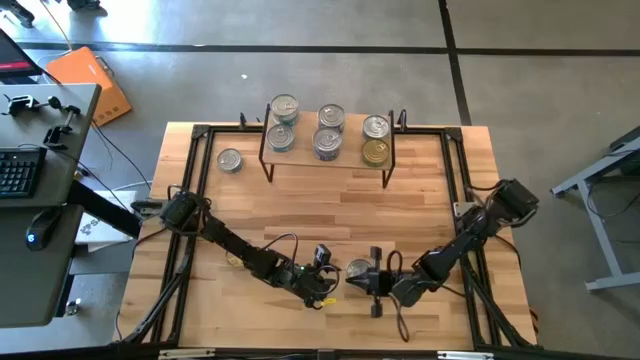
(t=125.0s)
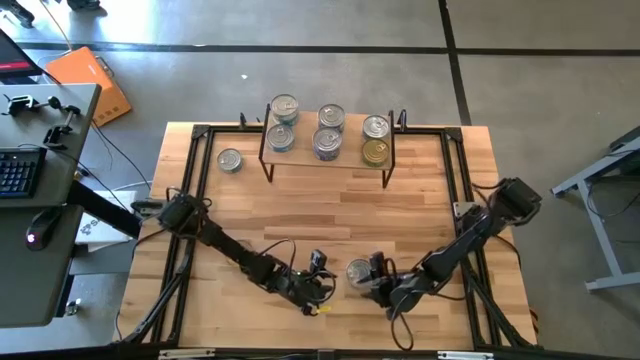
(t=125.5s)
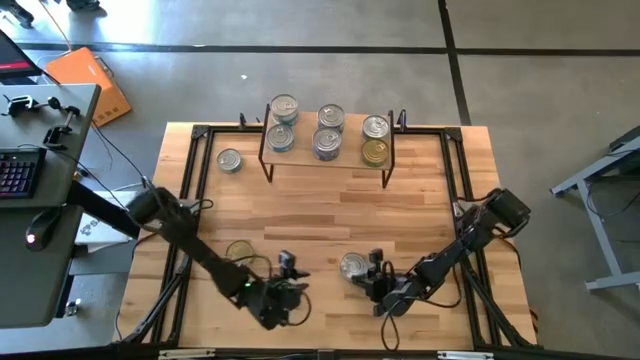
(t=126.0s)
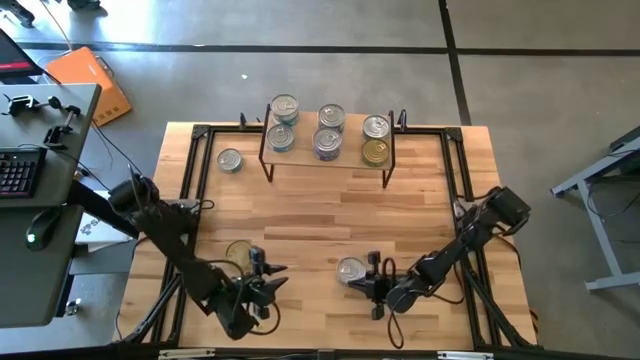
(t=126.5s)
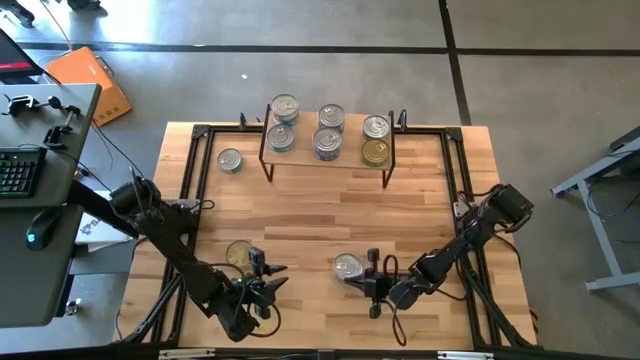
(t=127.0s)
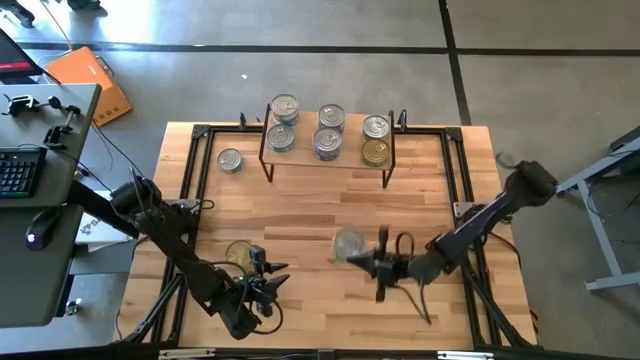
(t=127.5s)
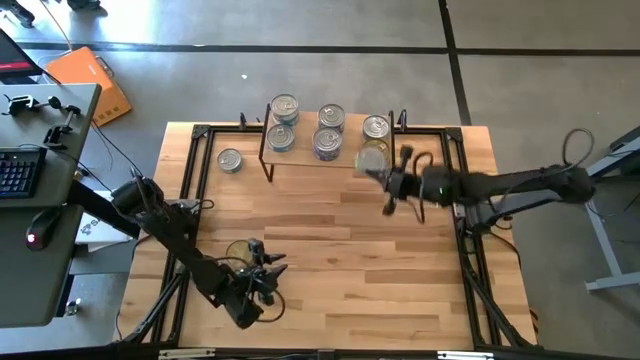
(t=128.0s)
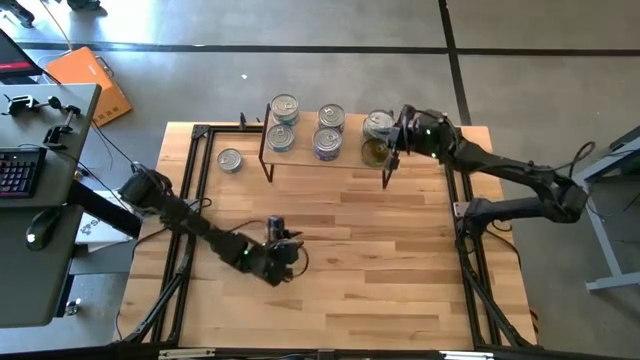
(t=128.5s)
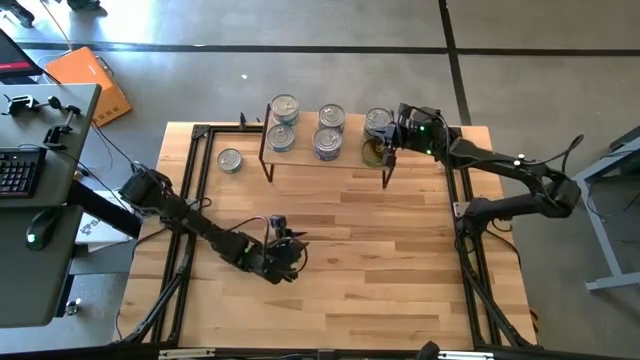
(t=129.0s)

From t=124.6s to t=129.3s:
Task: Stack canned seafood by type on shelf
Stack the green tuna can on top of the green tuna can on the shelf

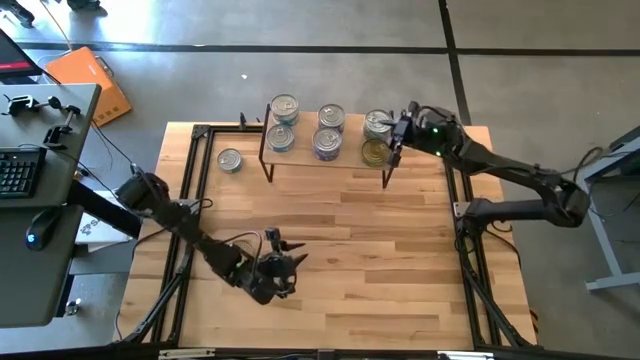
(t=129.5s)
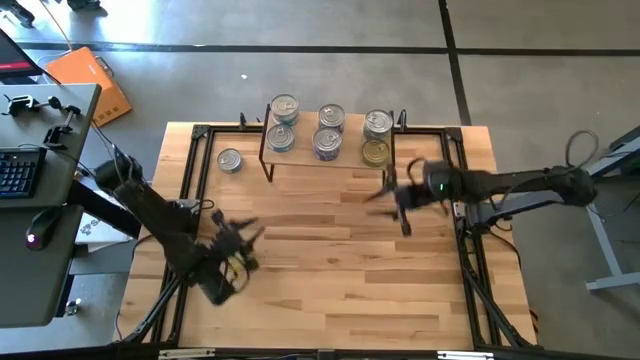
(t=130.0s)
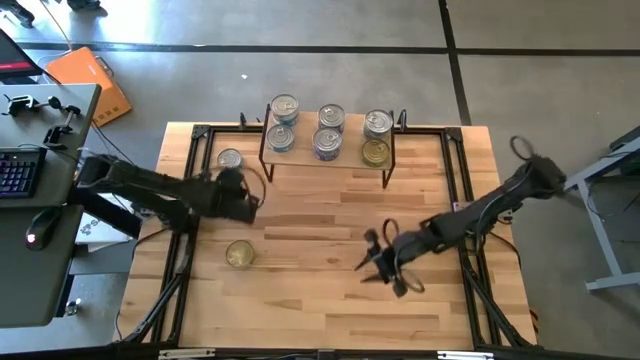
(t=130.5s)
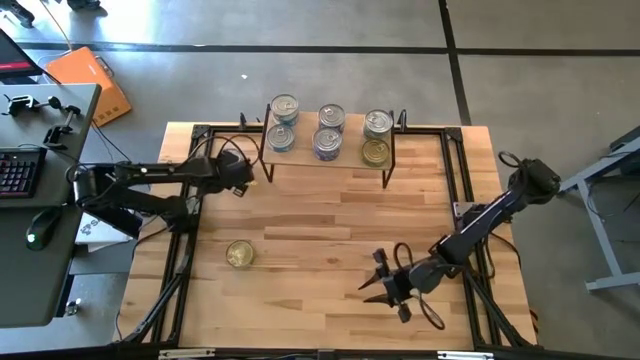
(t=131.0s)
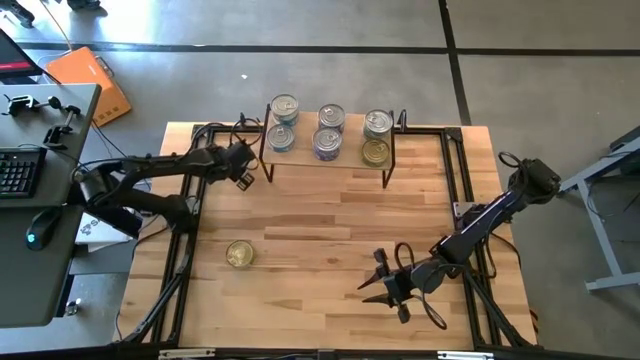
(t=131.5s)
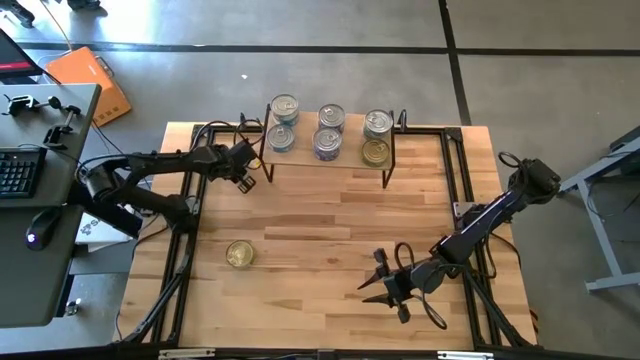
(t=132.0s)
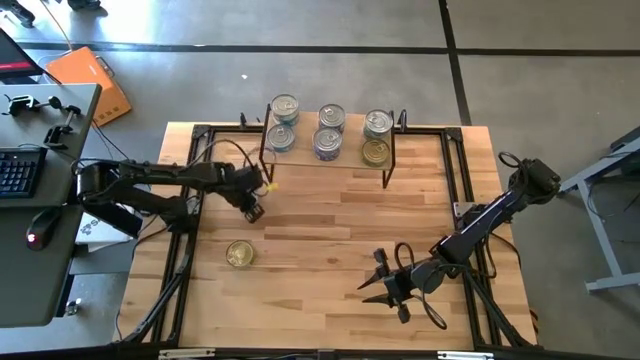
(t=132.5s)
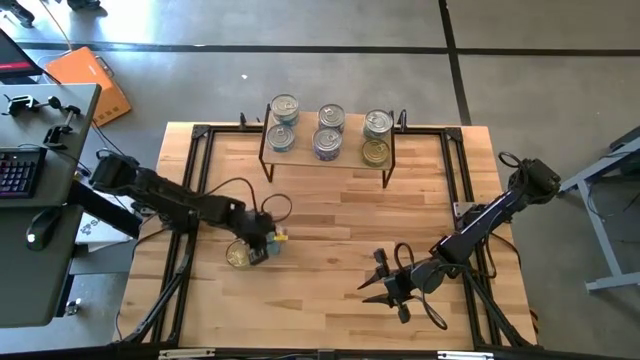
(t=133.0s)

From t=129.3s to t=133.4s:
Stack the yellow blue tuna can on top of the yellow blue tuna can on the shelf

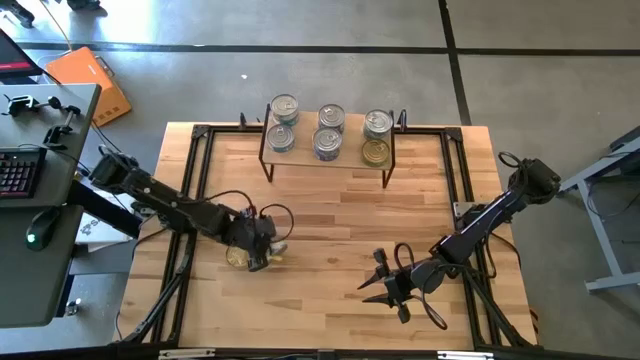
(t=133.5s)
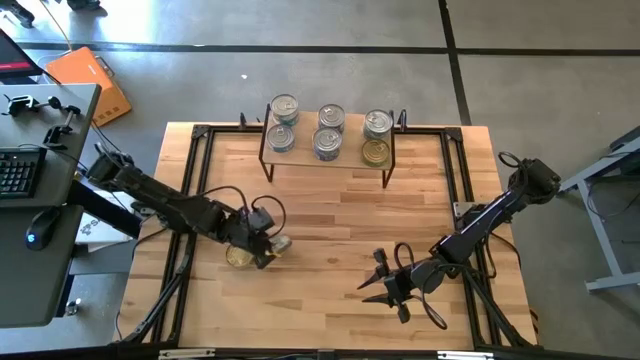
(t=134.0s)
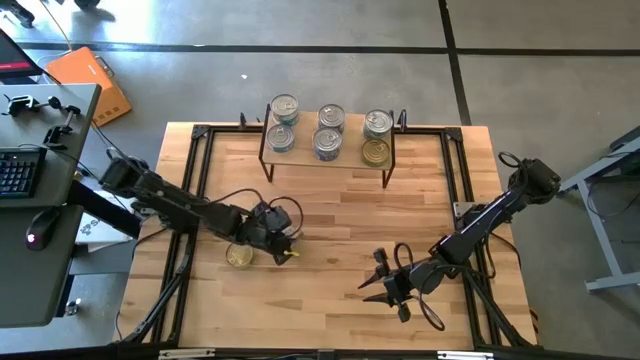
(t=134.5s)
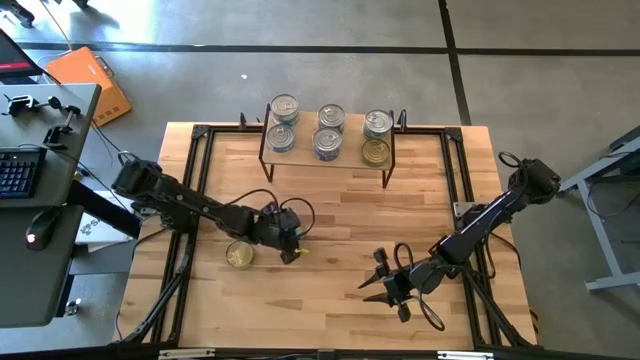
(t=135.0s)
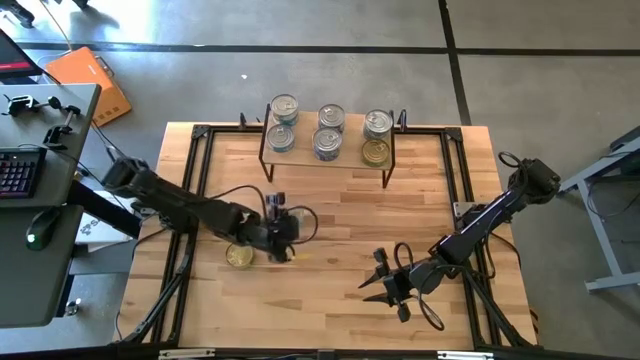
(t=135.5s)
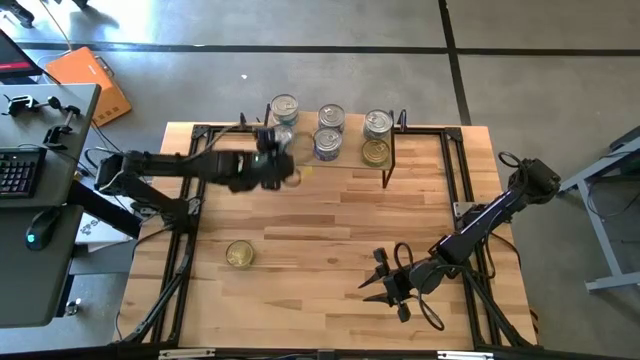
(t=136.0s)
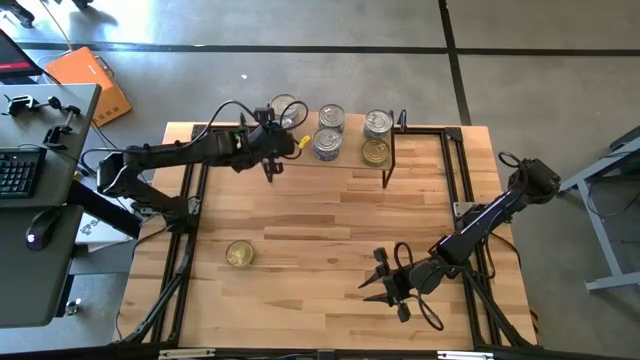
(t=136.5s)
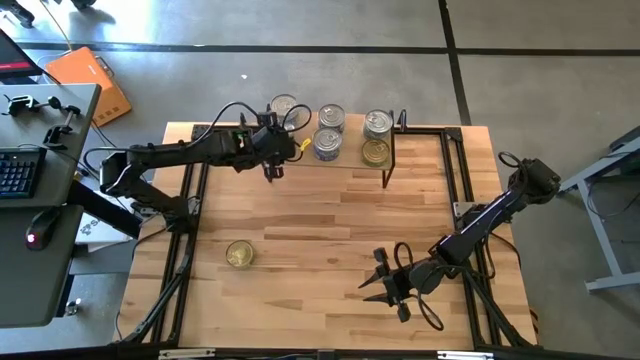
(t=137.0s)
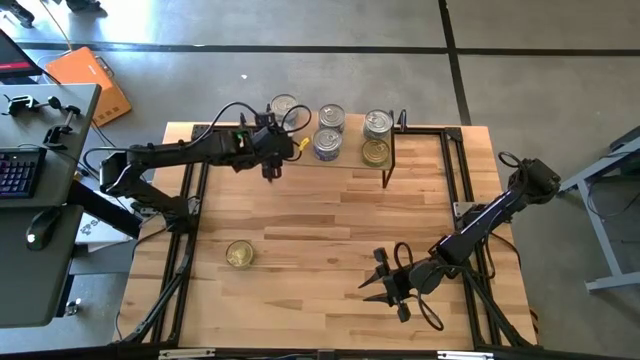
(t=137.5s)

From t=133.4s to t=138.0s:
Stack the yellow blue tuna can on top of the yellow blue tuna can on the shelf

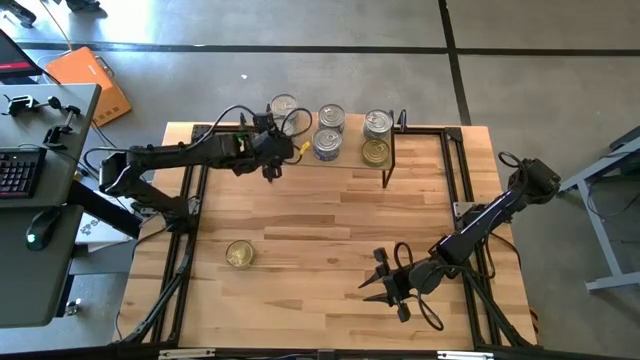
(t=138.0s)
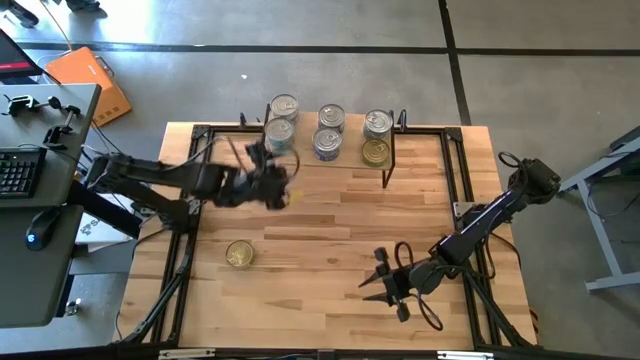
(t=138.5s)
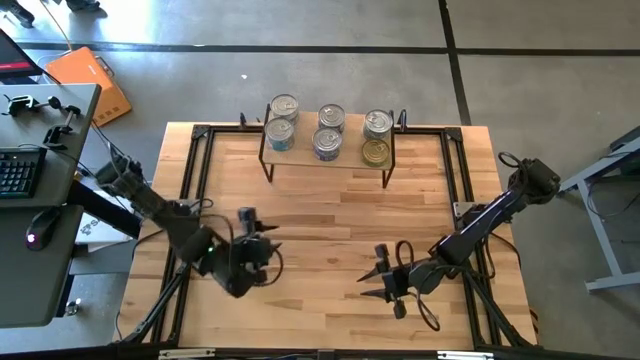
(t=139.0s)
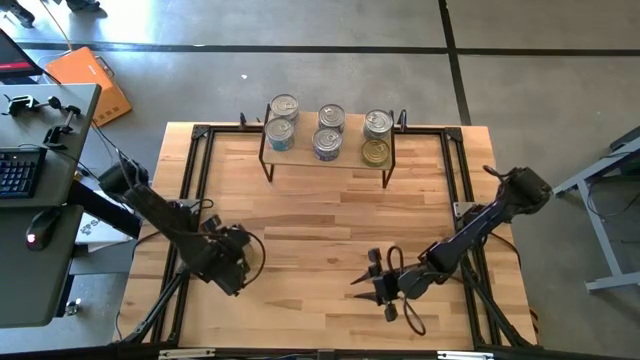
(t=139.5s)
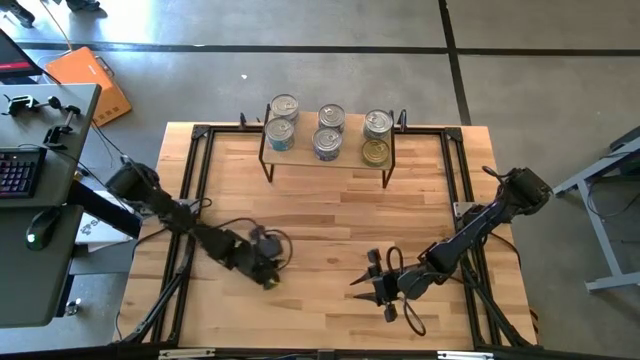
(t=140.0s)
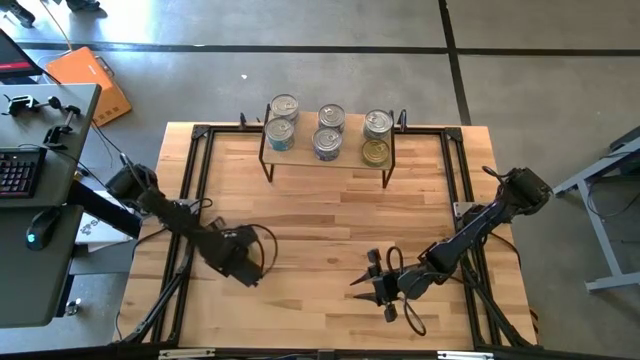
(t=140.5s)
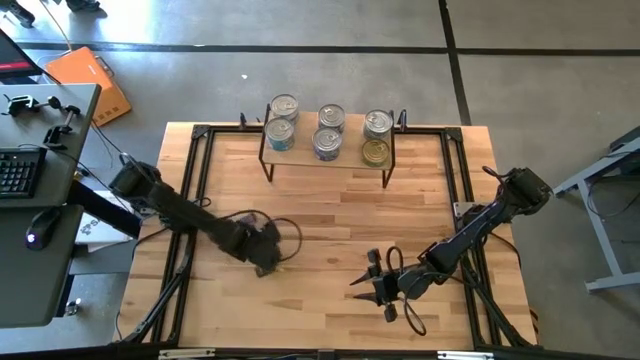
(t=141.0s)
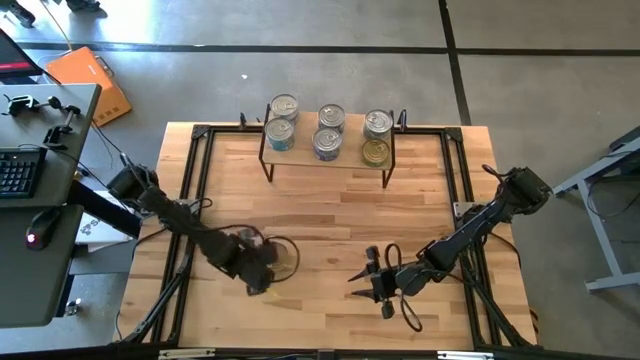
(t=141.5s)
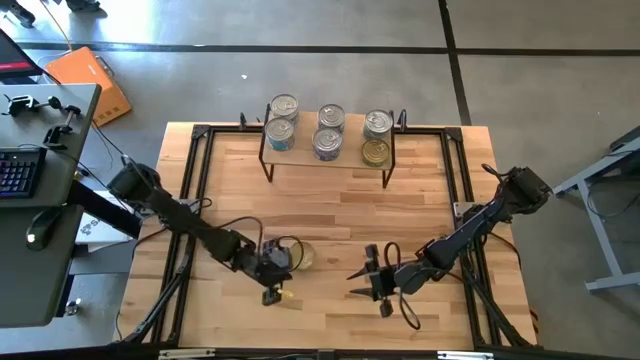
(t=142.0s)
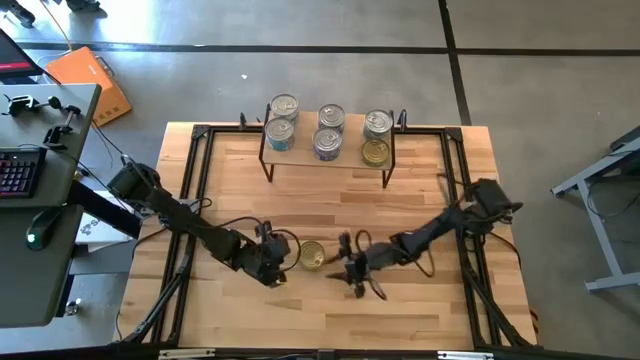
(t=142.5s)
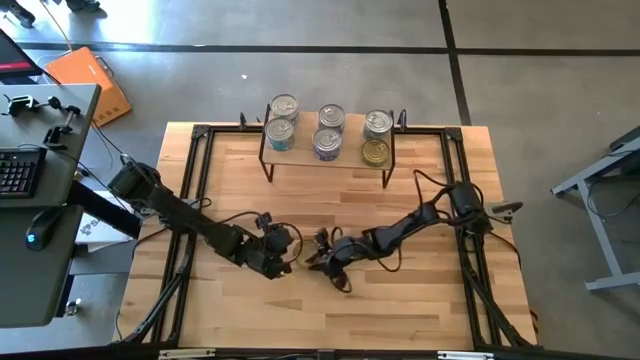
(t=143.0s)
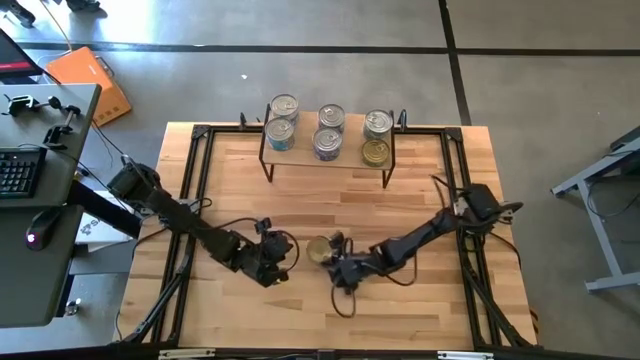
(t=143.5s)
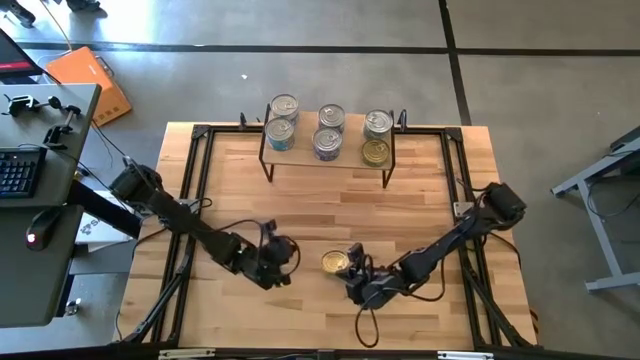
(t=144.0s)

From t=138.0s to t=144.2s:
Stack the green tuna can on top of the green tuna can on the shelf
